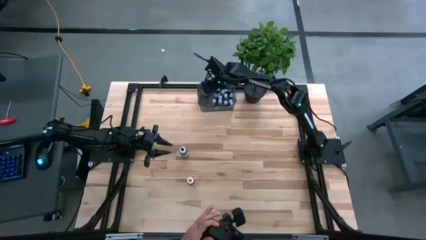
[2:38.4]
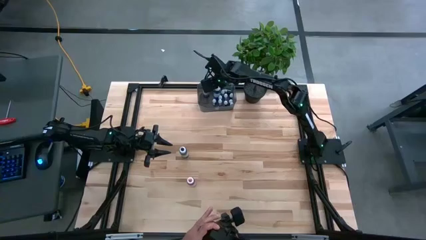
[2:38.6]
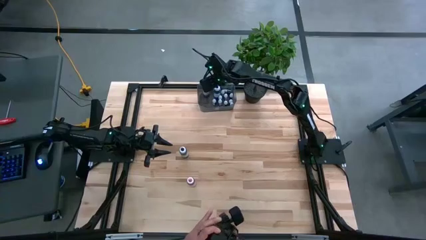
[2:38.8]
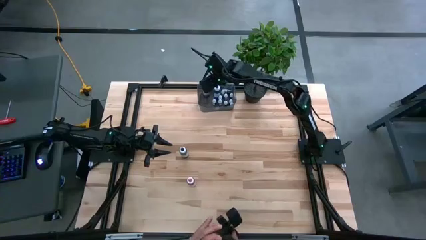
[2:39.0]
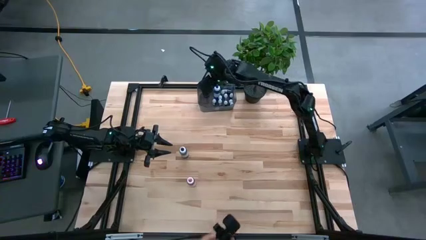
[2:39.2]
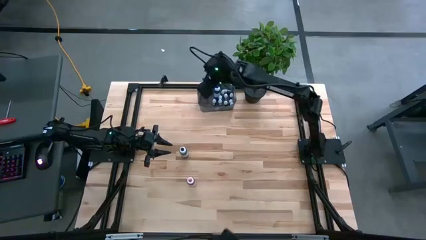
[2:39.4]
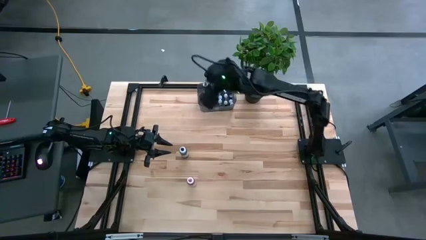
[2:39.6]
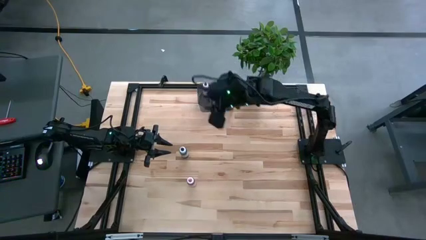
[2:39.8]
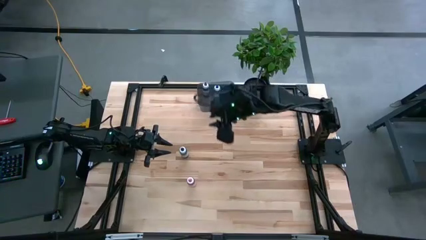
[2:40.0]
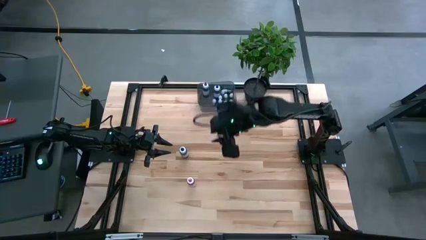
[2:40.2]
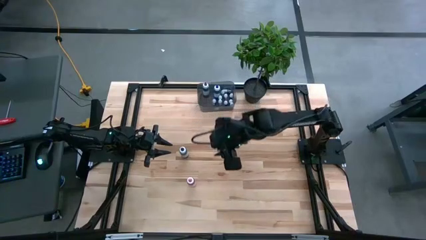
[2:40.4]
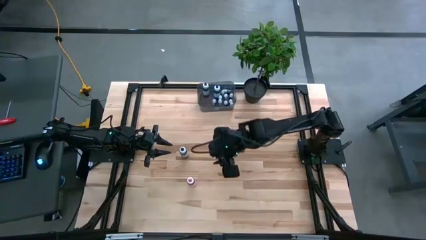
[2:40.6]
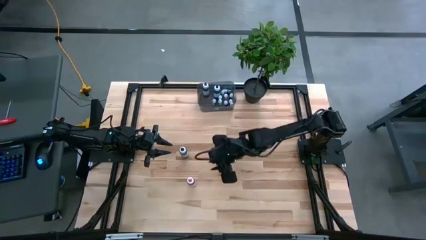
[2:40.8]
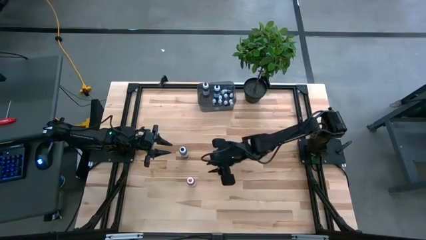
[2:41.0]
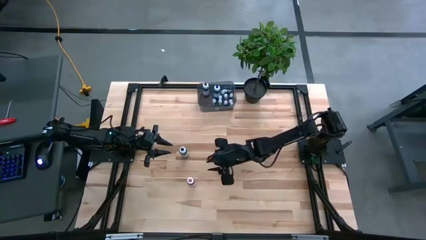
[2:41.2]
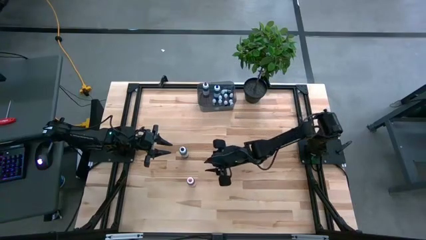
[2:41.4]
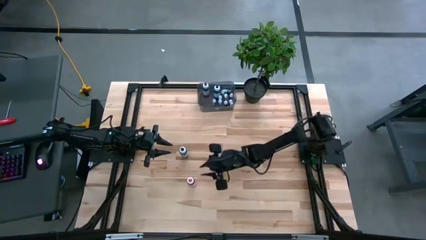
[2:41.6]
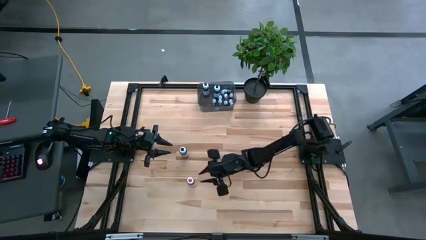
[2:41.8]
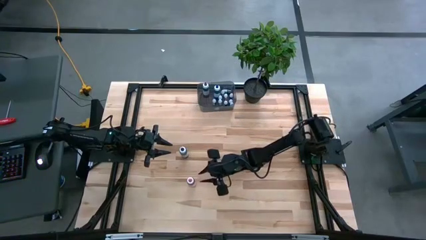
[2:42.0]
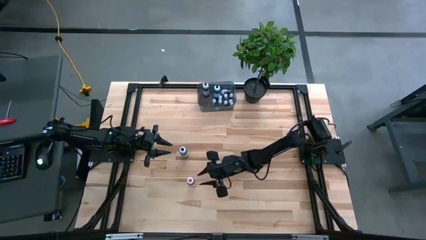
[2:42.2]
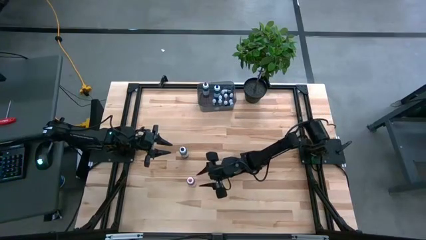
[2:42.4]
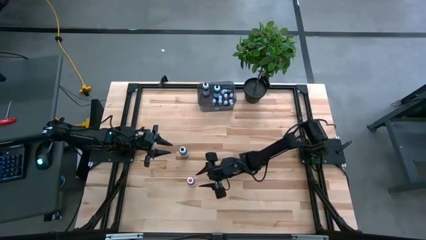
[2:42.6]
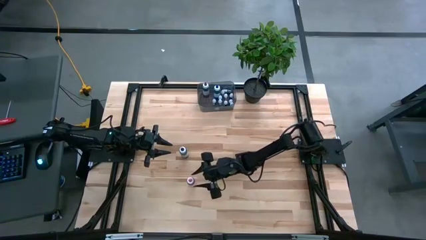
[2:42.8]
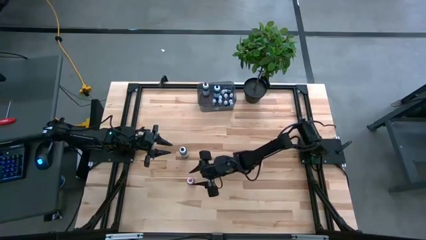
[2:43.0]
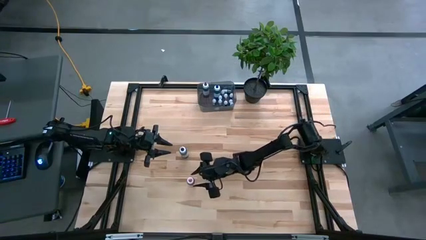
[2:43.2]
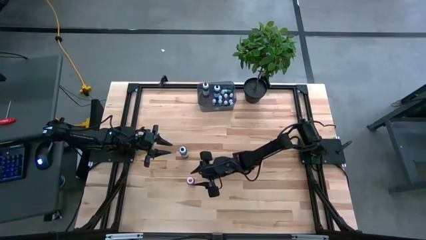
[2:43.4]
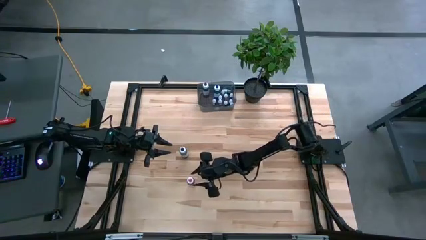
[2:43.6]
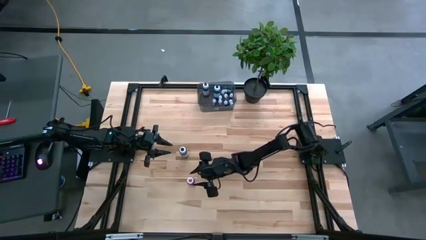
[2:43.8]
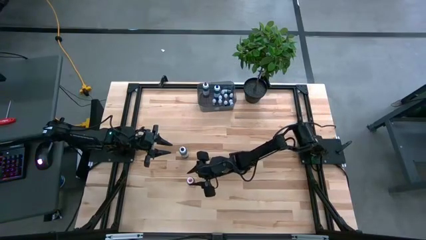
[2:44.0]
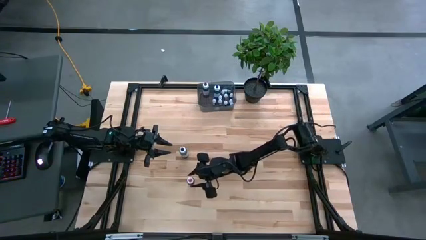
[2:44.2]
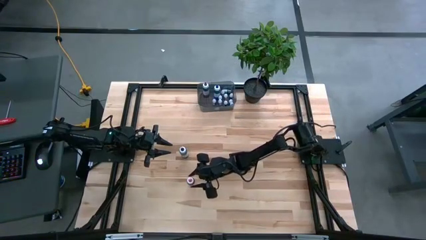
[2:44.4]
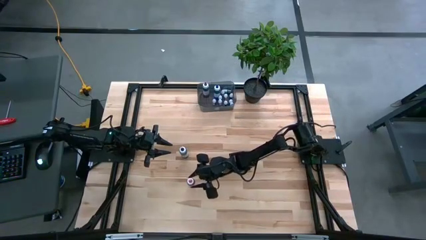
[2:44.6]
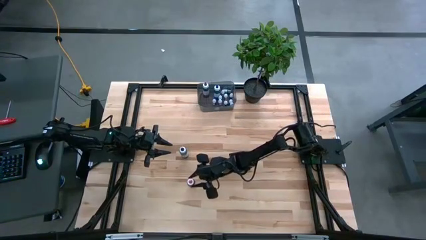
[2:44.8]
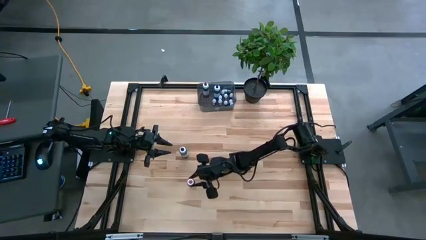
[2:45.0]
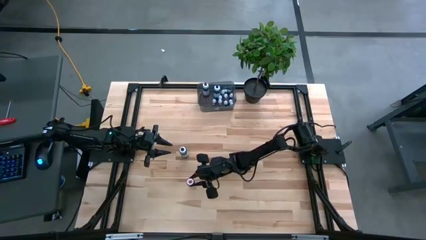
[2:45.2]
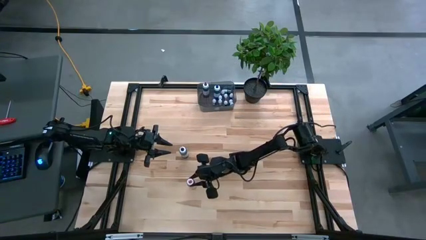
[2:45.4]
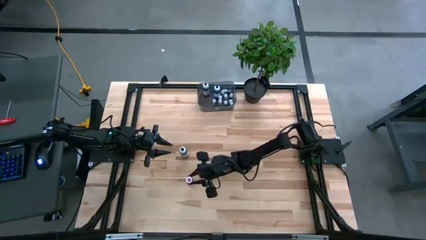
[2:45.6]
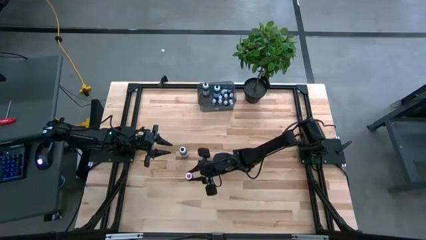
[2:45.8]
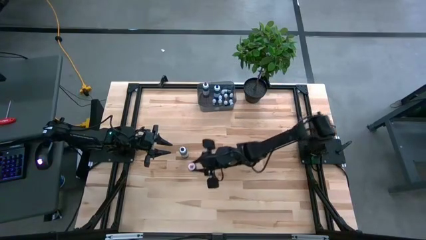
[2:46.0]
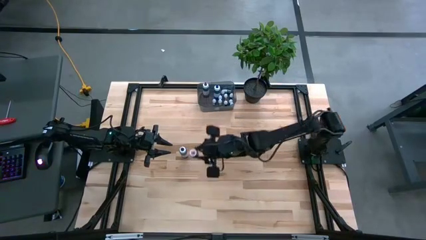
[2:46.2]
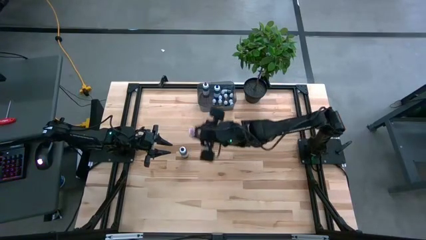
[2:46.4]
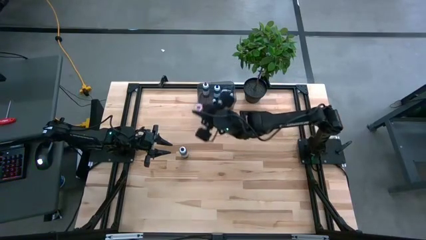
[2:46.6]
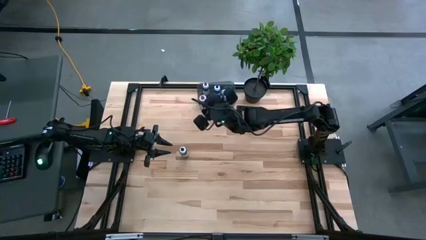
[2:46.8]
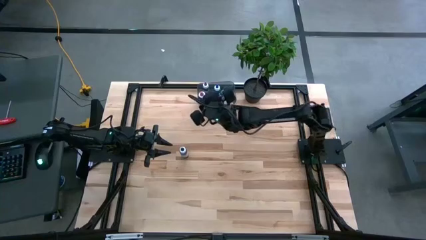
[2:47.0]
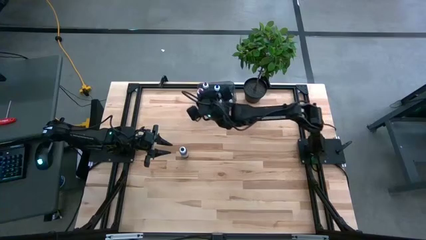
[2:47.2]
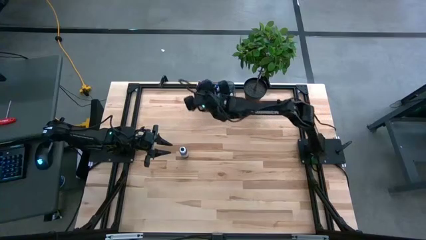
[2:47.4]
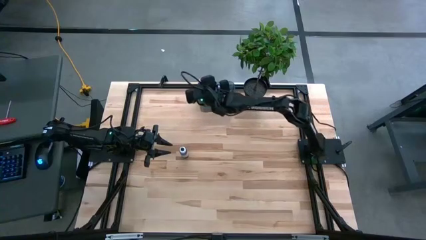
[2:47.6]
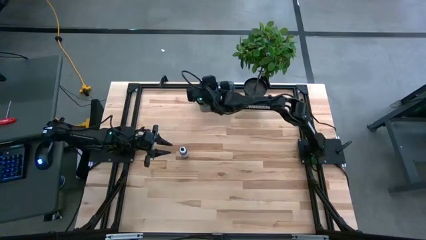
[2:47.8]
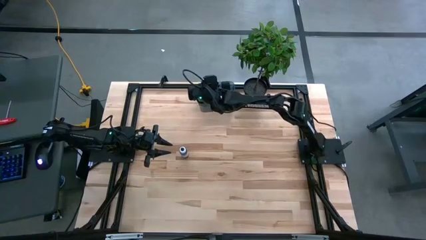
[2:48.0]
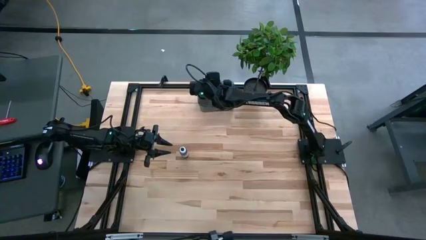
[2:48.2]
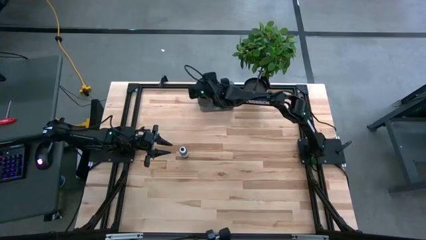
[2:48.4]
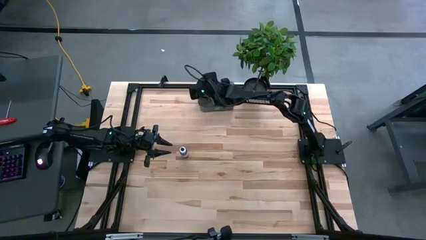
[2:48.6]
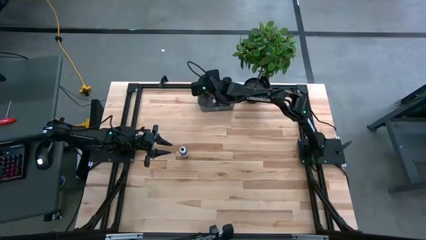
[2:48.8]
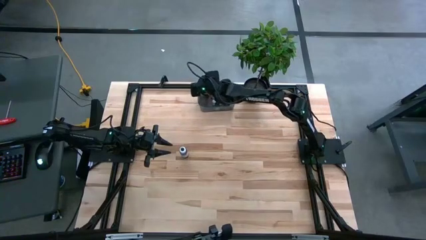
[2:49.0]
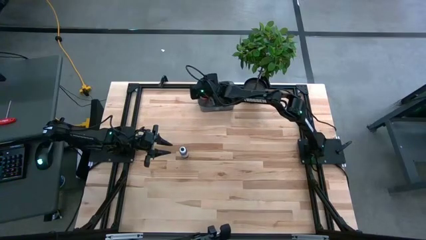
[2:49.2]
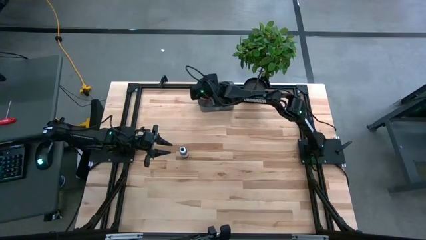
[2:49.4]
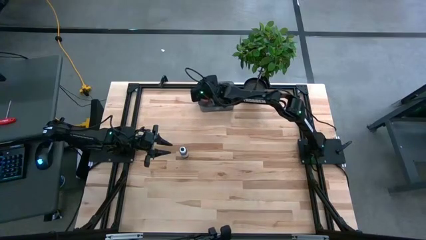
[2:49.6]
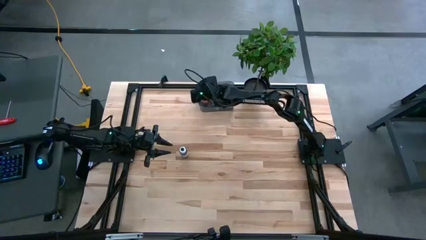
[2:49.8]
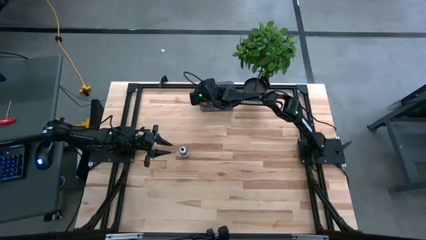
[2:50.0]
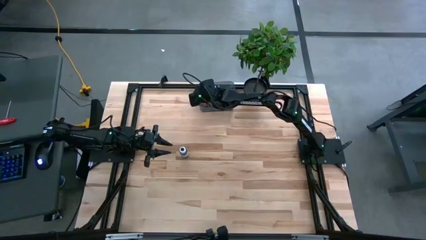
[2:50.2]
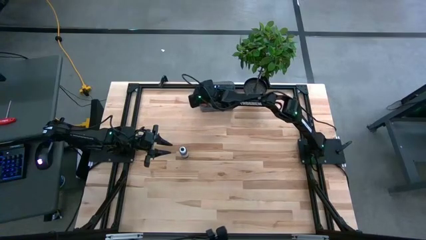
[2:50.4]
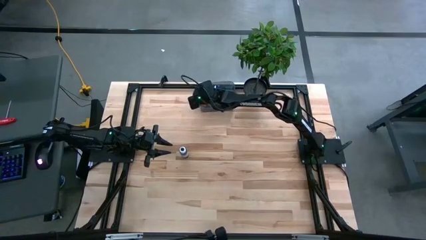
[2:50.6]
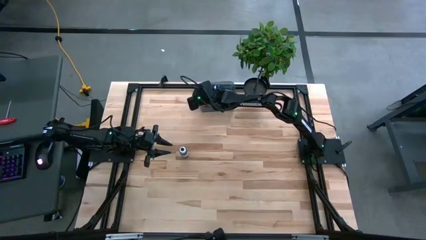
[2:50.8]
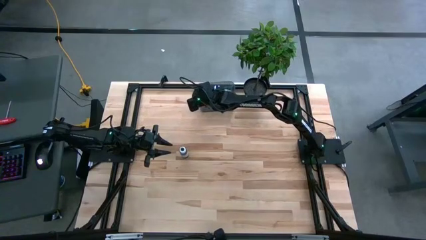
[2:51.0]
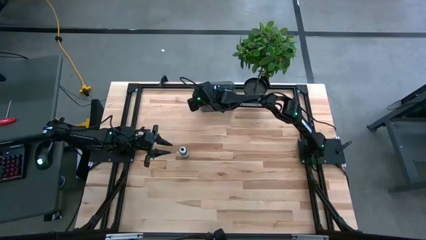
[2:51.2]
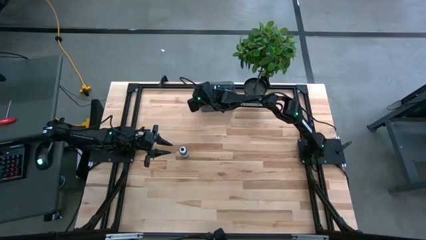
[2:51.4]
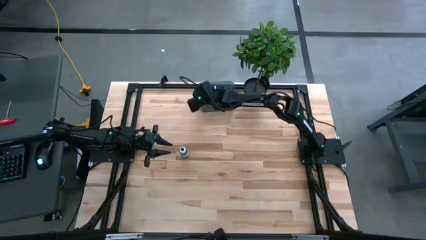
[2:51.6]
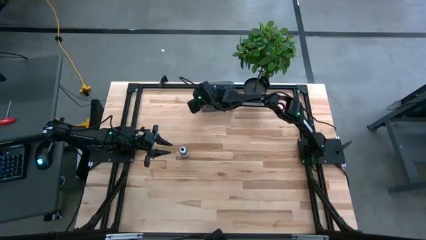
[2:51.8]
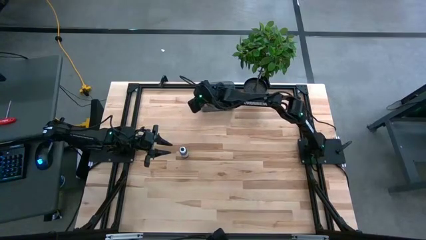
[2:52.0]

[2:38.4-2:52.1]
Task: Pick & Place food coloring
Put the large pink food coloring bottle into the black bin
